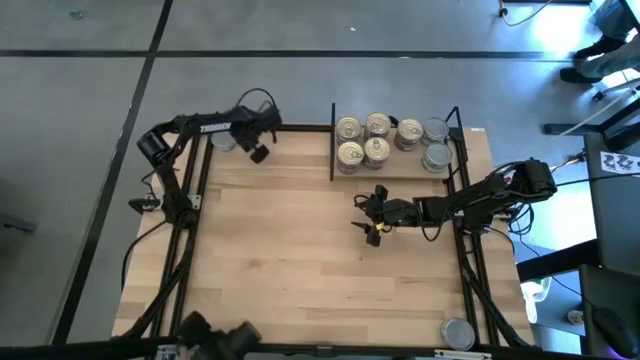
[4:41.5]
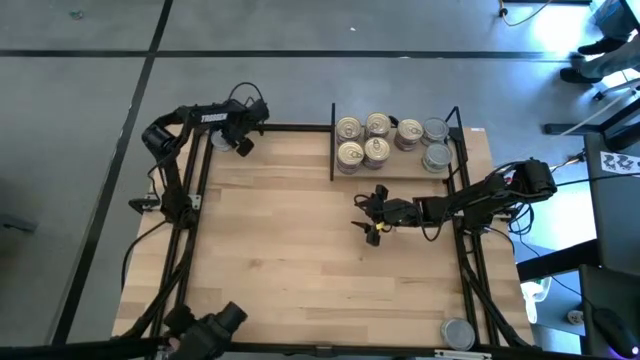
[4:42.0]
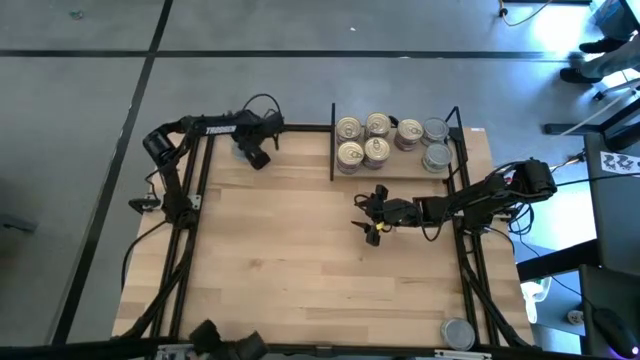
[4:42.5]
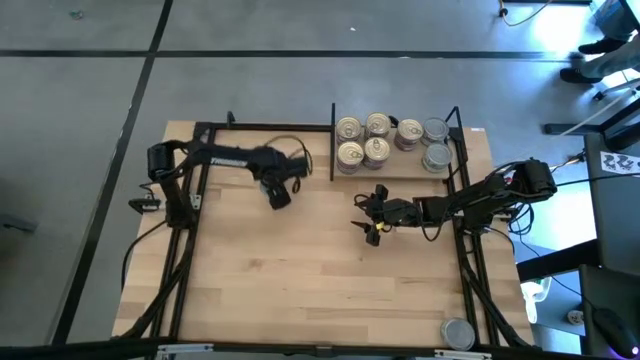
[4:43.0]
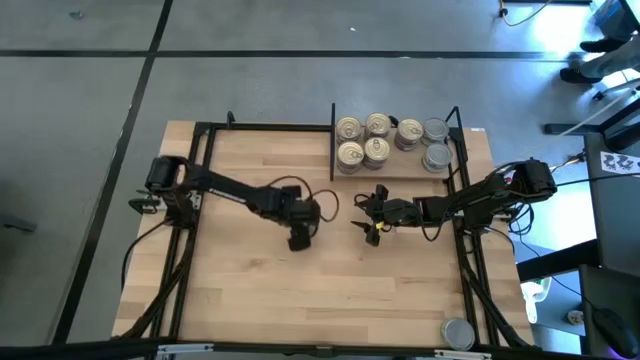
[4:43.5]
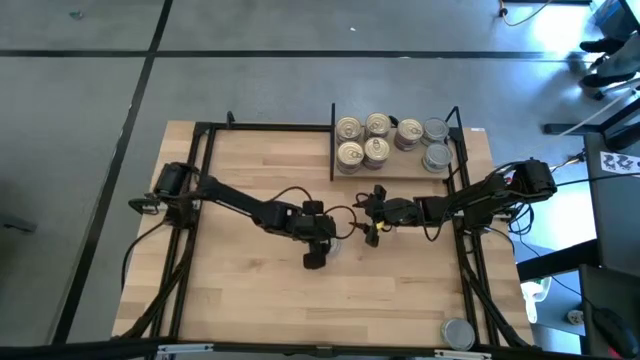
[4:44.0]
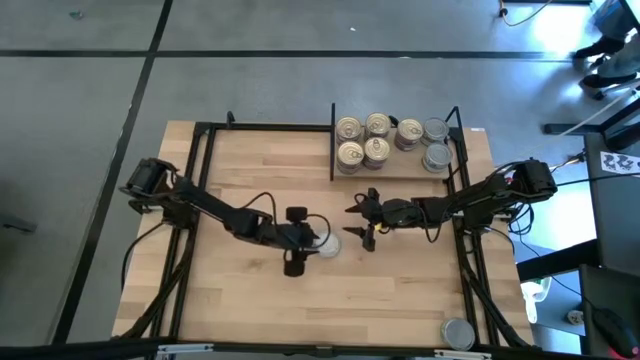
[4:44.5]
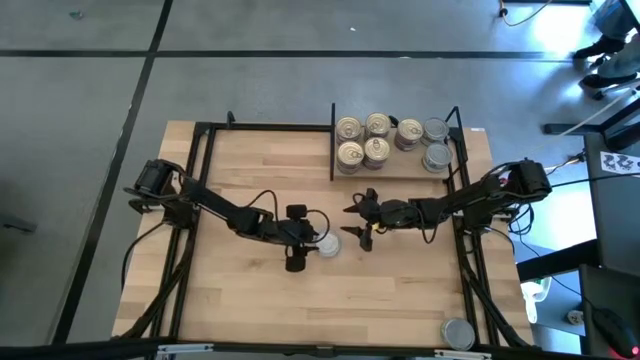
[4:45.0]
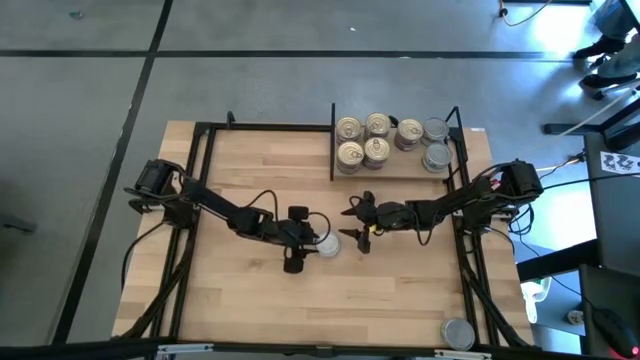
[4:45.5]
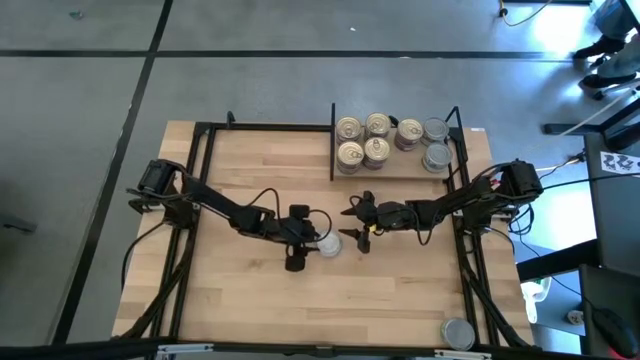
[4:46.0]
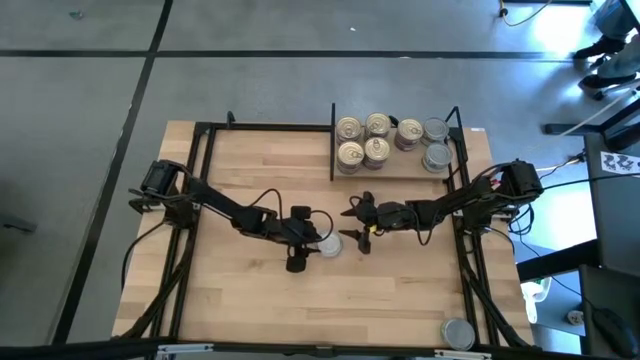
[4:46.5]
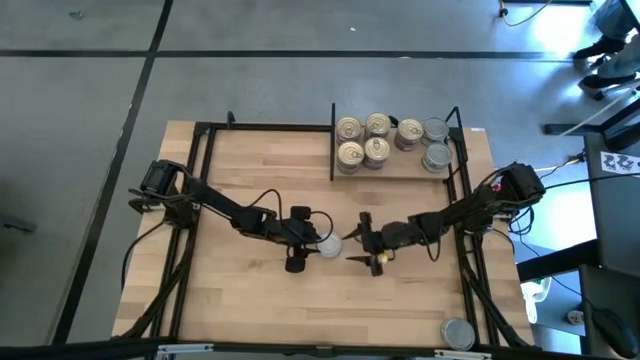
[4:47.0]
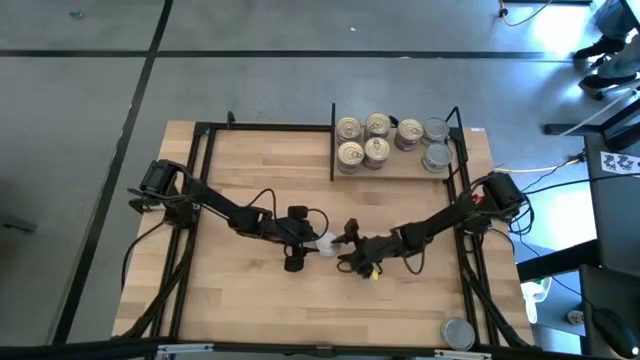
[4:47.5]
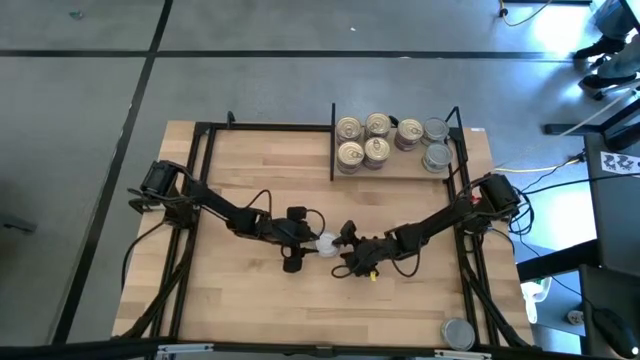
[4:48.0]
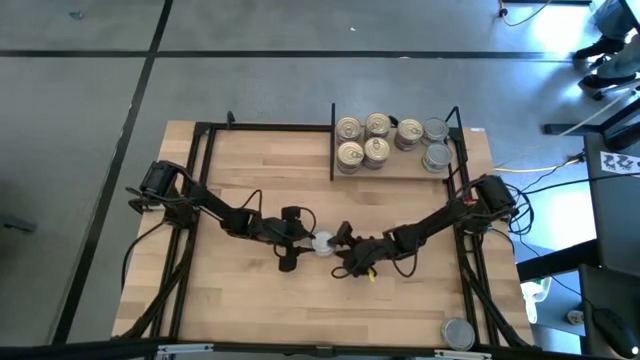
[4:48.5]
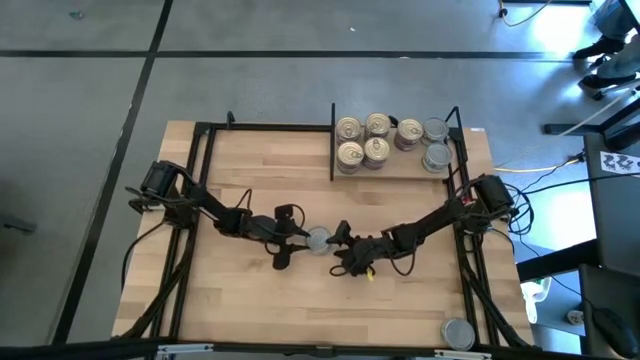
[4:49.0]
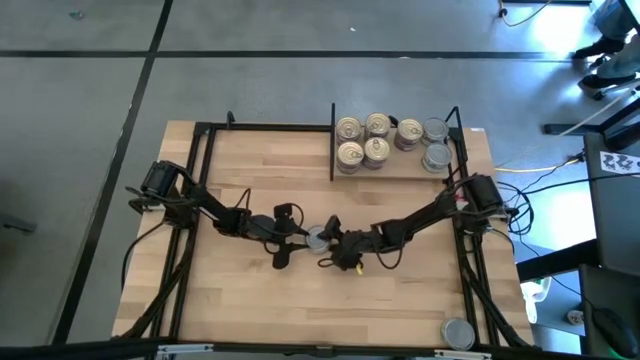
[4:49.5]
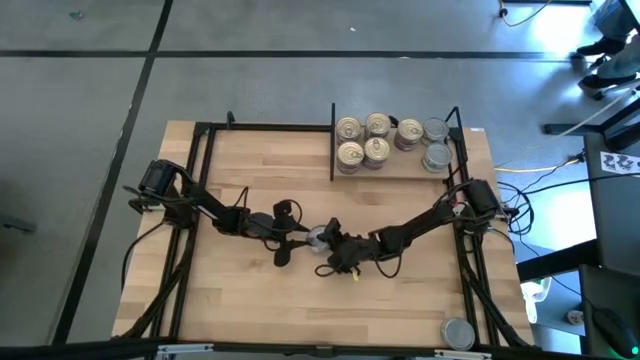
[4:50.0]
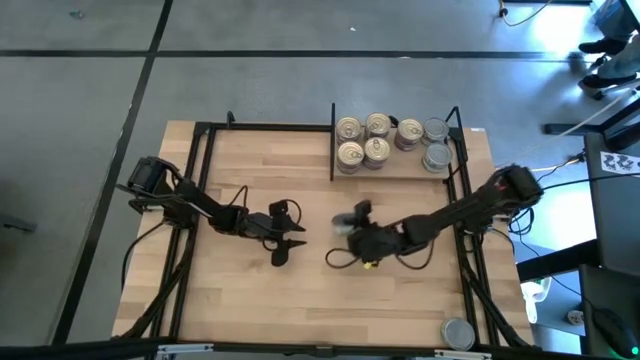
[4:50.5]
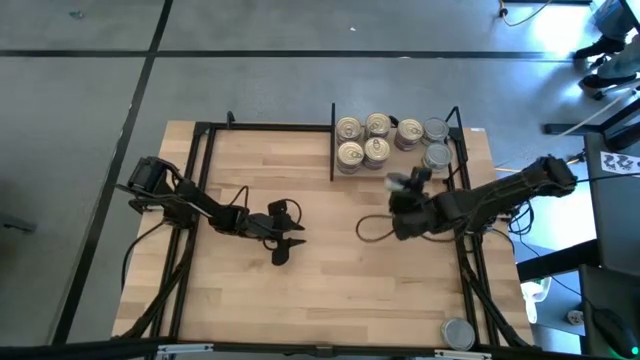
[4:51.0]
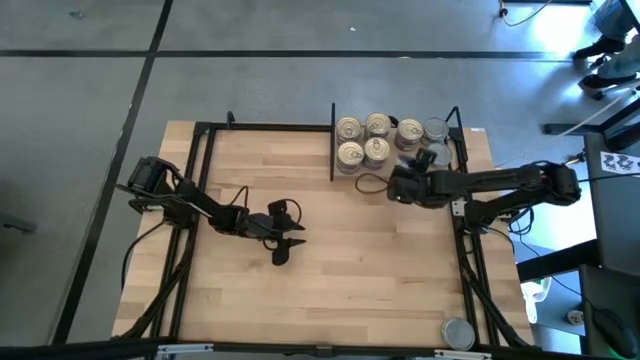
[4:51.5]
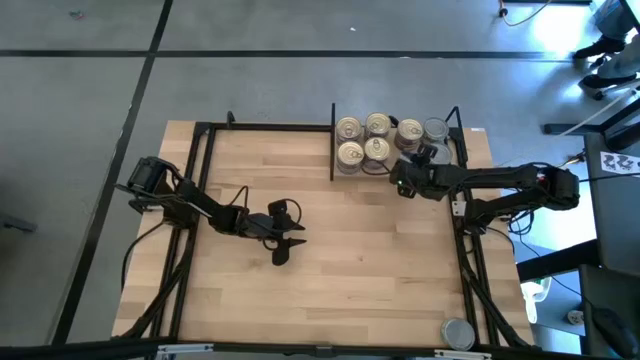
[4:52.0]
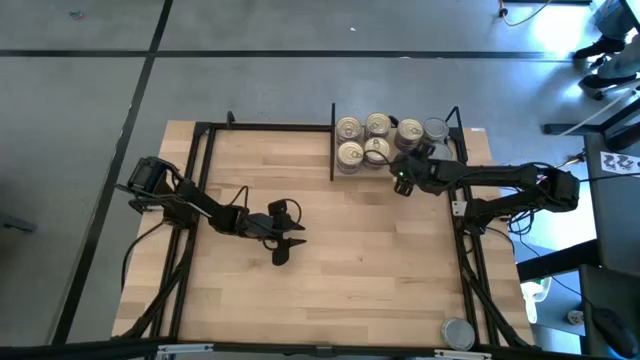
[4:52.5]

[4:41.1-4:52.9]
Task: Stack canned seafood by type on shelf
Put the green tuna can on the shelf

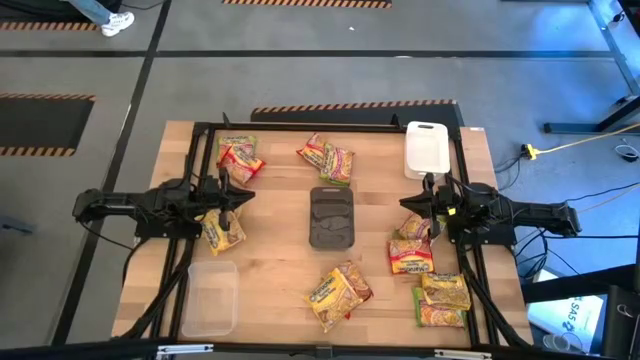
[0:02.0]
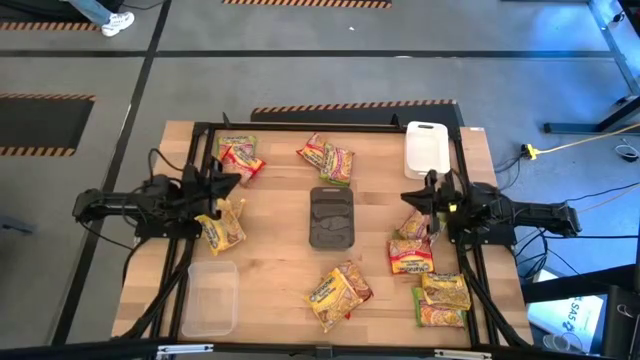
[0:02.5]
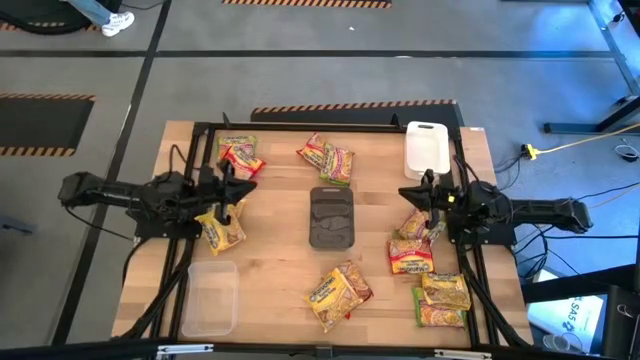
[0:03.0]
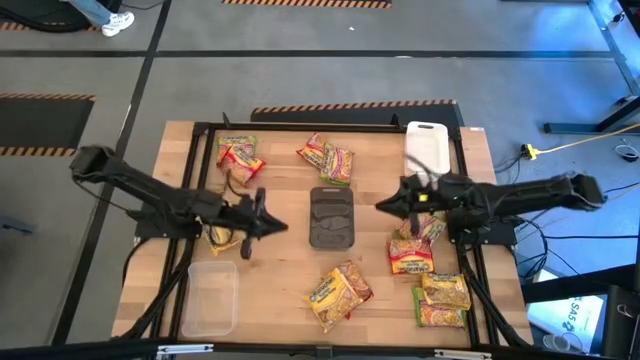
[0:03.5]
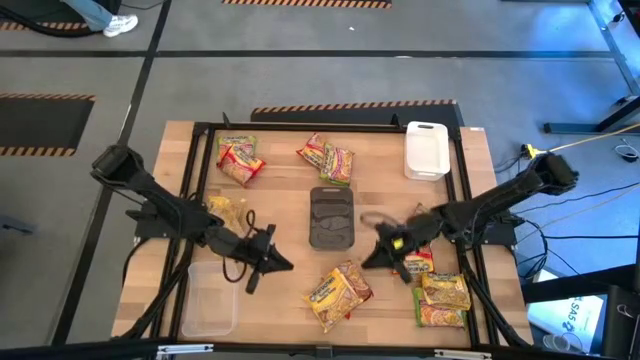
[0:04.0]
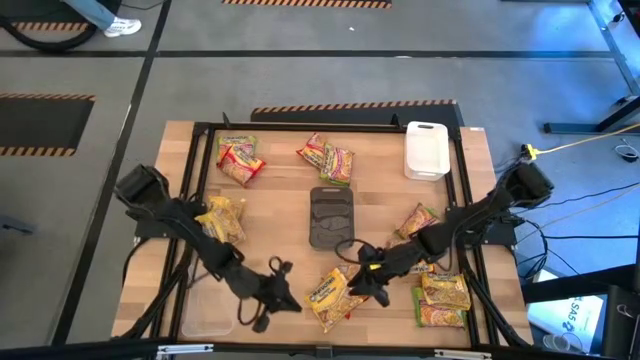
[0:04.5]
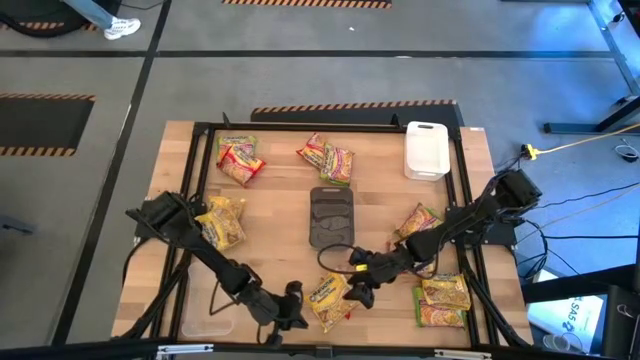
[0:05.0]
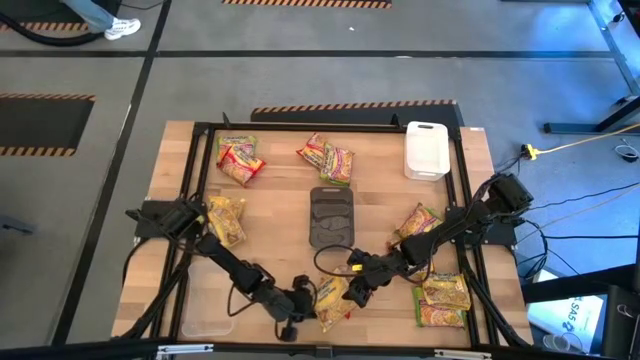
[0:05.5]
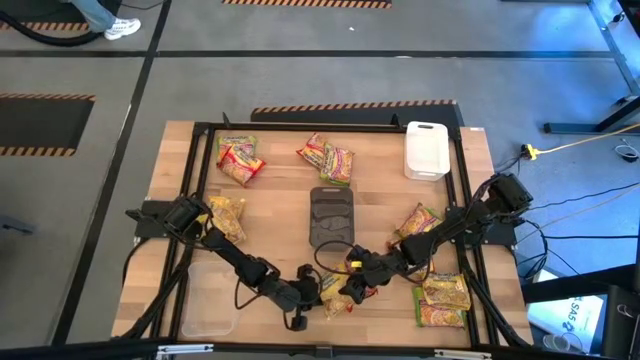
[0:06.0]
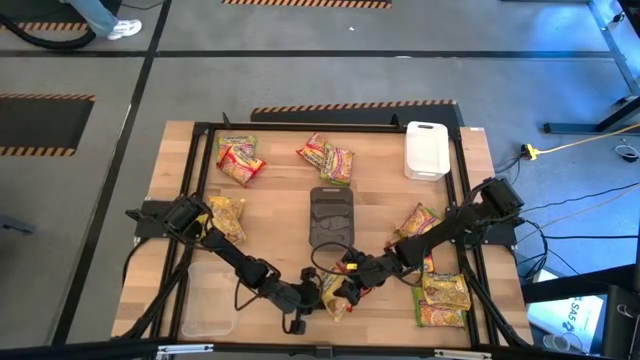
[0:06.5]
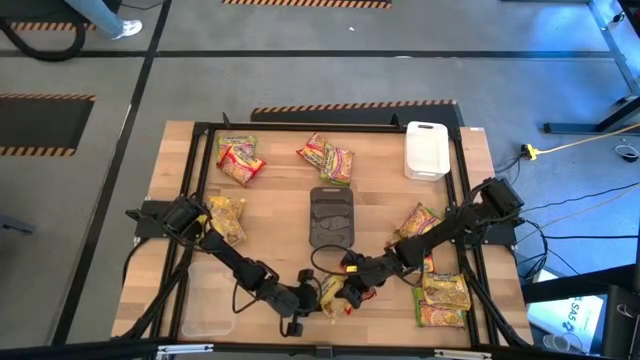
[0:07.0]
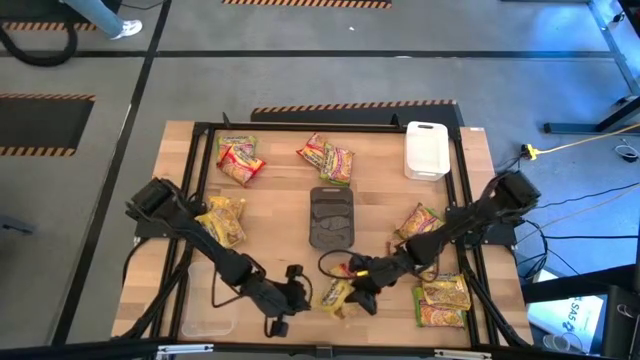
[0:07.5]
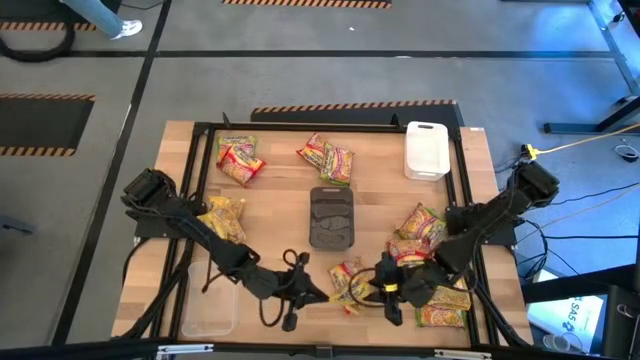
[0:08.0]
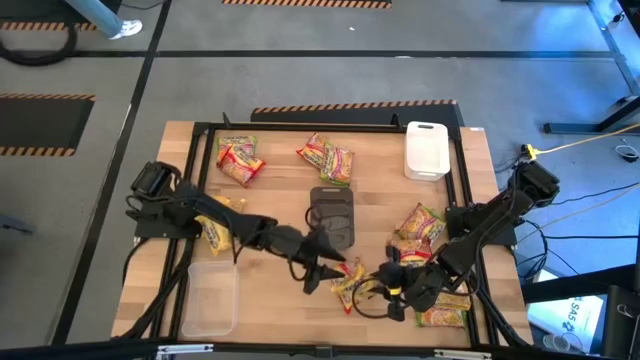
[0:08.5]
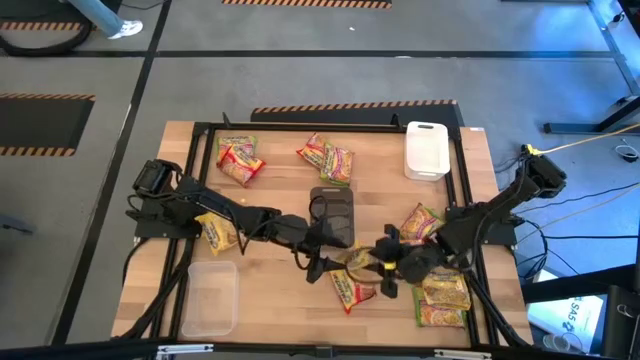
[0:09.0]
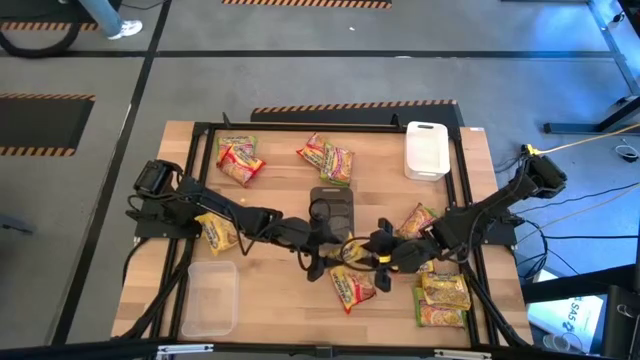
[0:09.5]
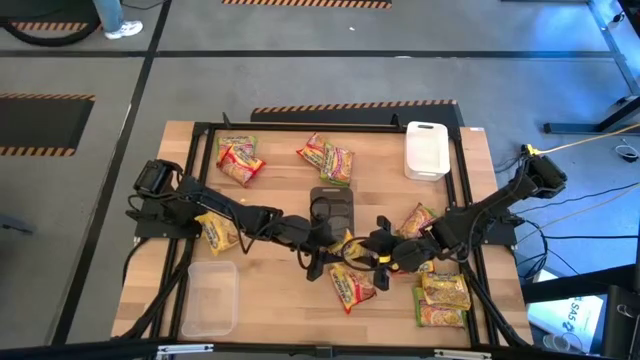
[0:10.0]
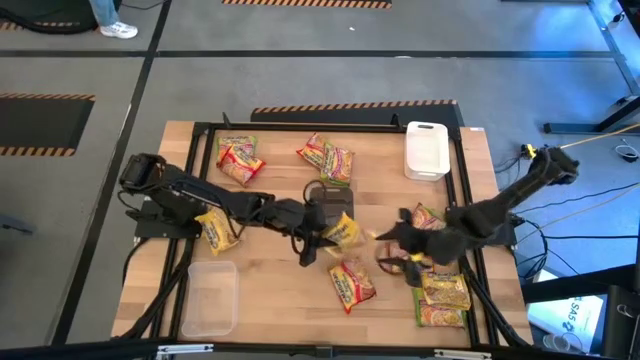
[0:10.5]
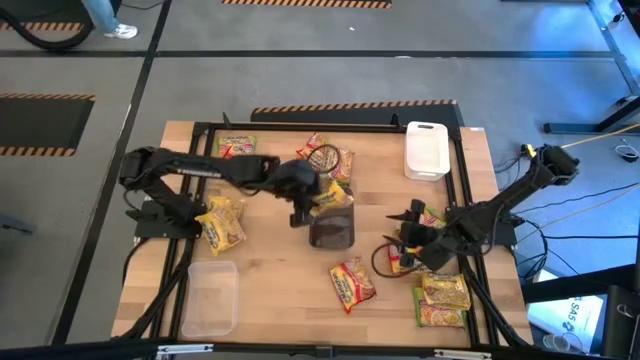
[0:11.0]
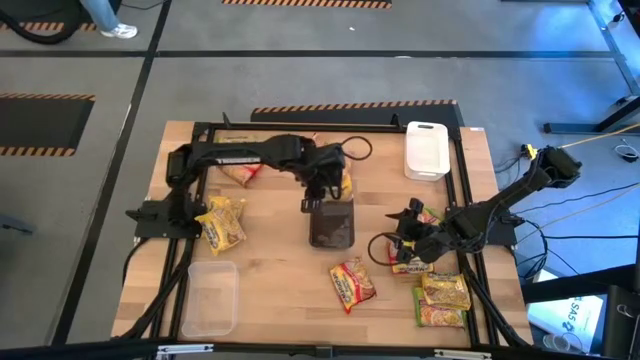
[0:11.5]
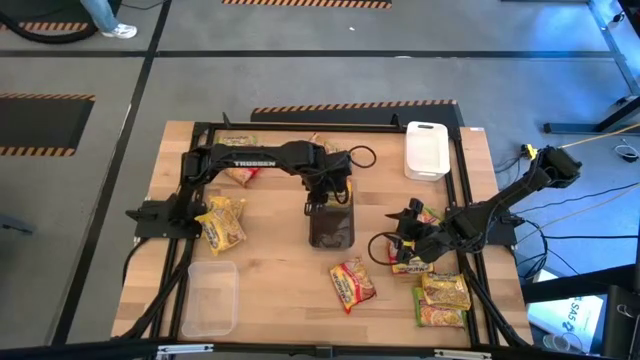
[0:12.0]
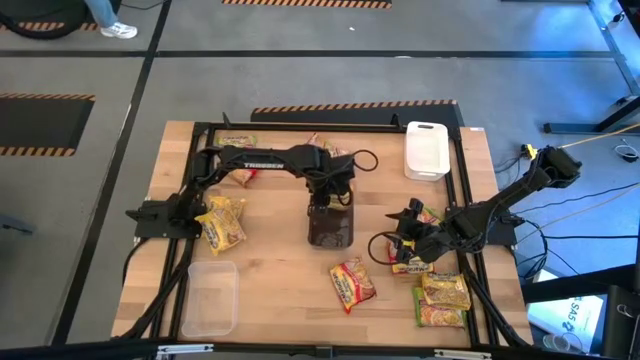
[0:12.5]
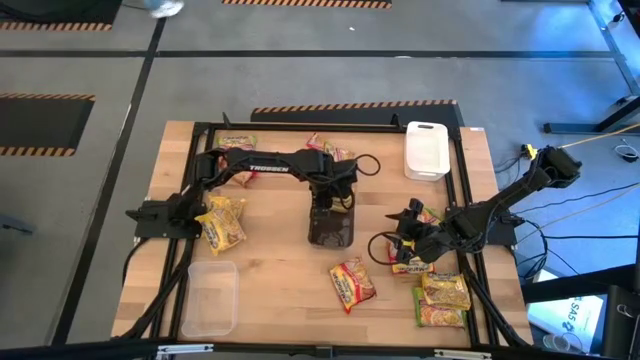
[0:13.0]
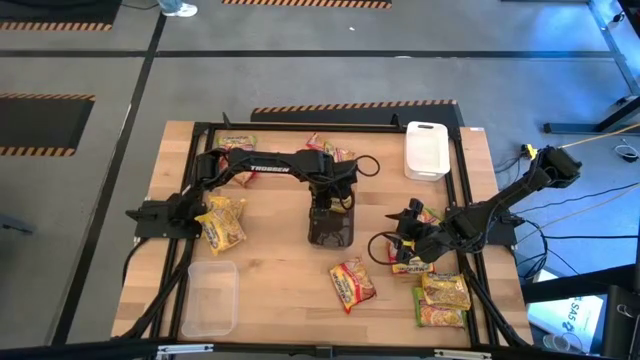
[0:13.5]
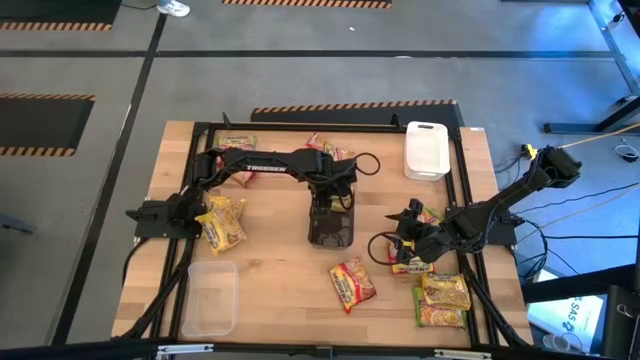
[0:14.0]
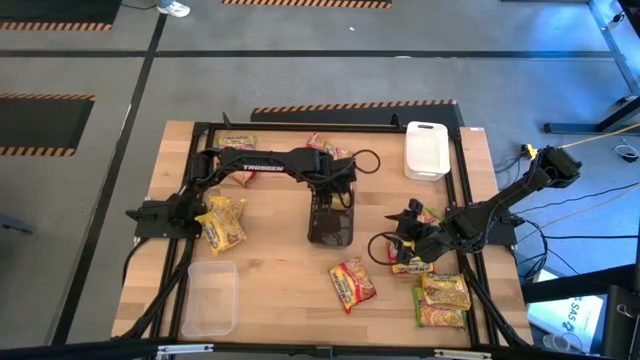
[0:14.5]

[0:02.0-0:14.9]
Task: Sort Maruchan noodles
Put the yellow noodle pack into the black bin
